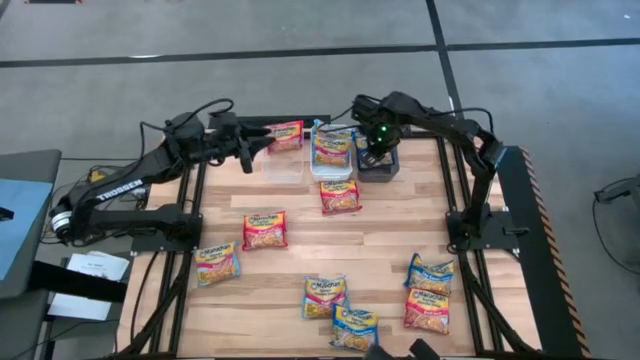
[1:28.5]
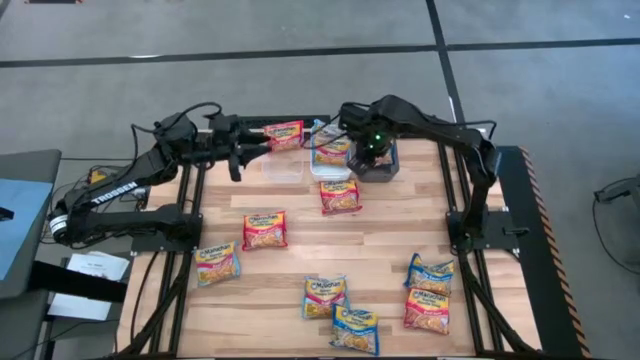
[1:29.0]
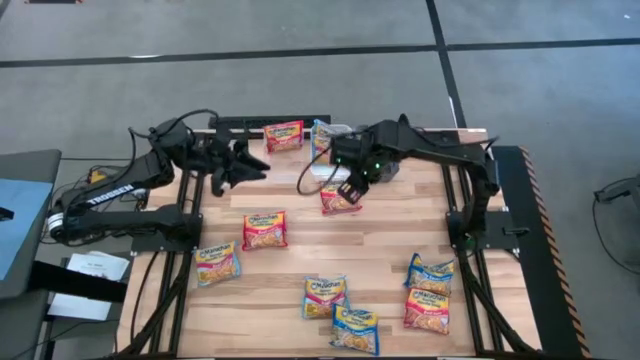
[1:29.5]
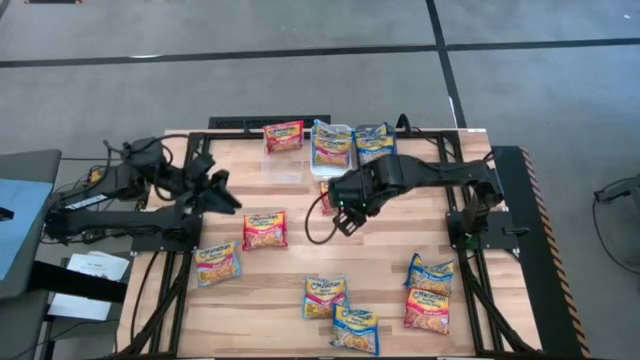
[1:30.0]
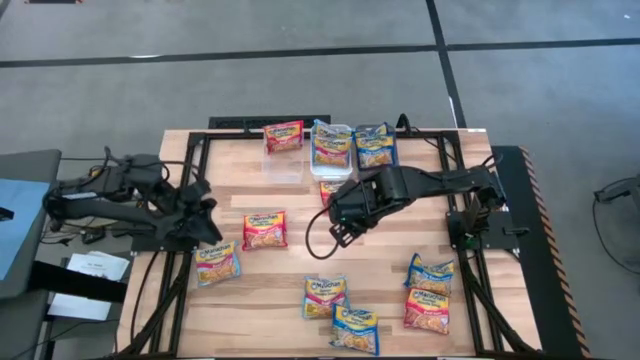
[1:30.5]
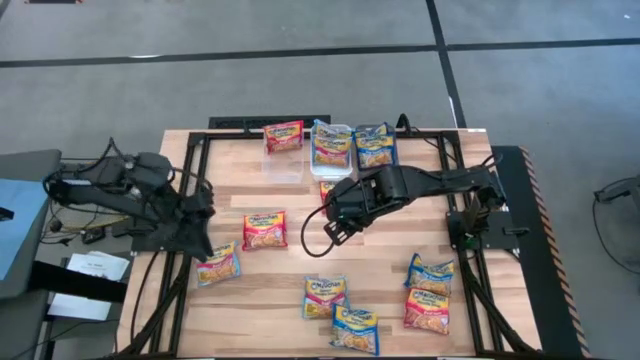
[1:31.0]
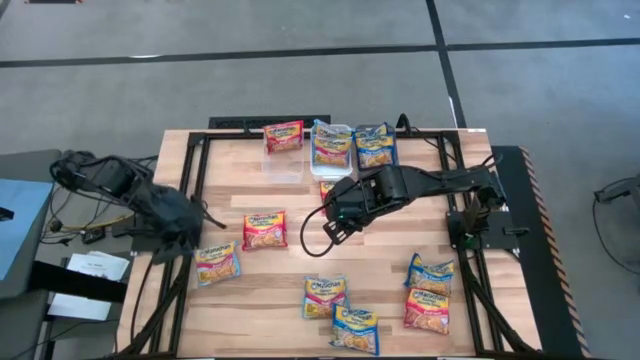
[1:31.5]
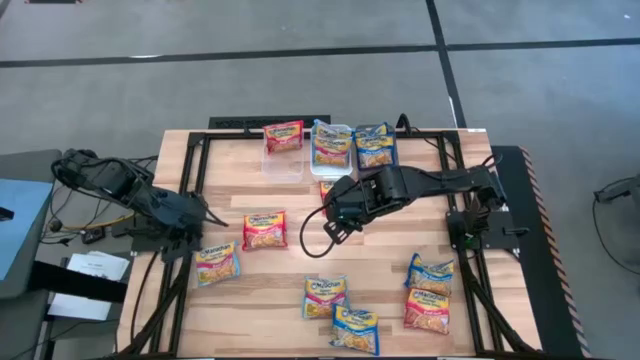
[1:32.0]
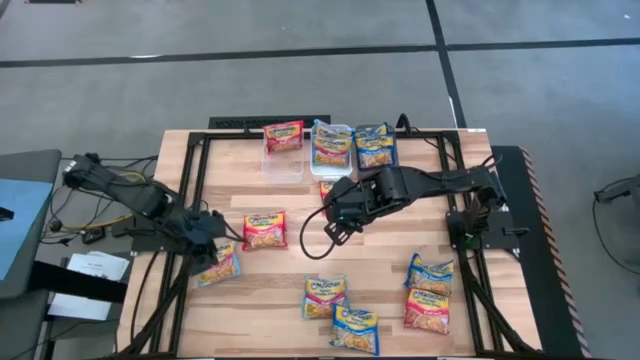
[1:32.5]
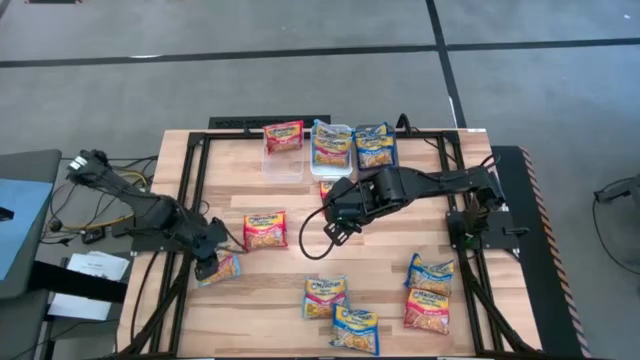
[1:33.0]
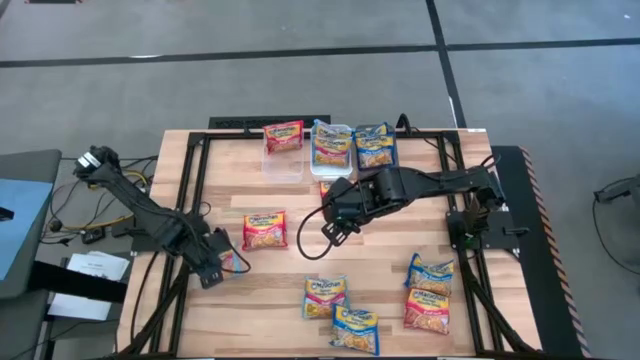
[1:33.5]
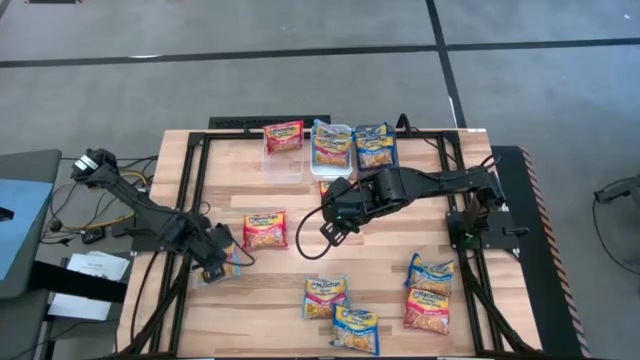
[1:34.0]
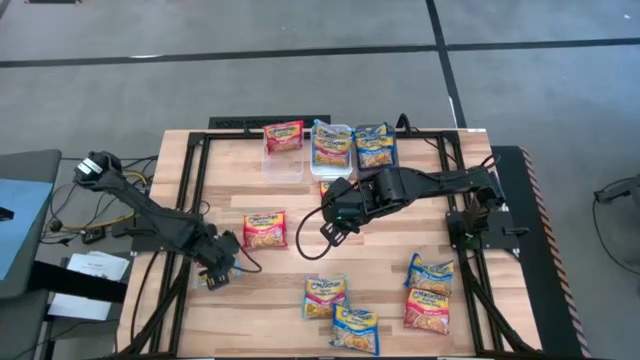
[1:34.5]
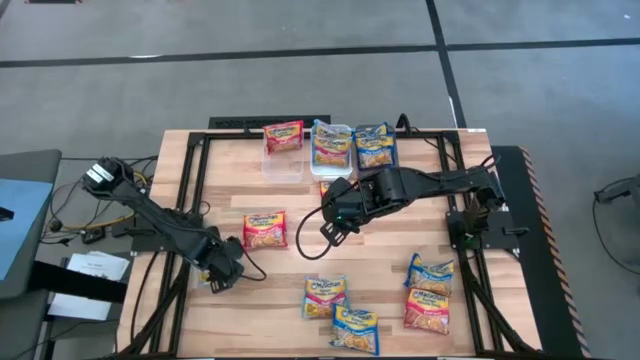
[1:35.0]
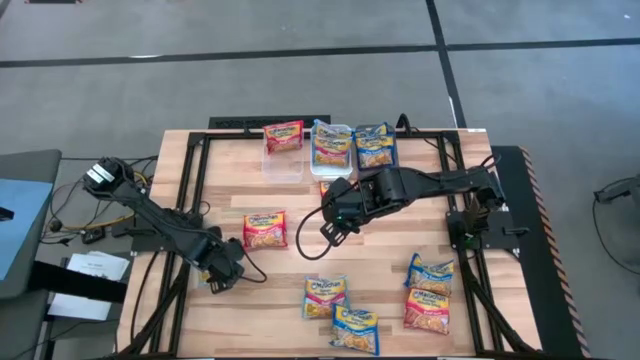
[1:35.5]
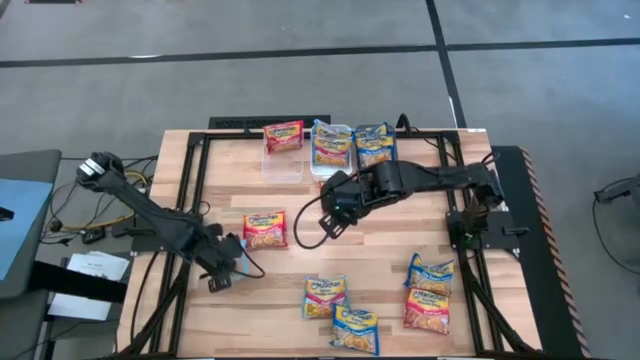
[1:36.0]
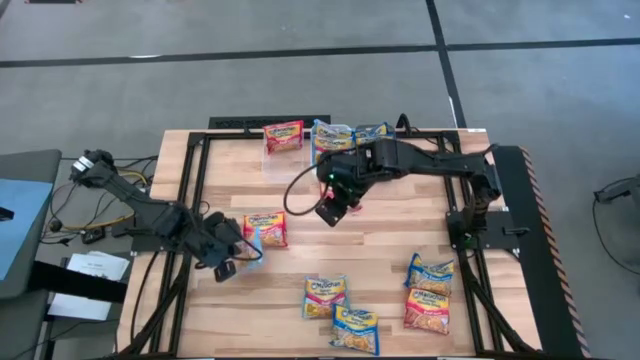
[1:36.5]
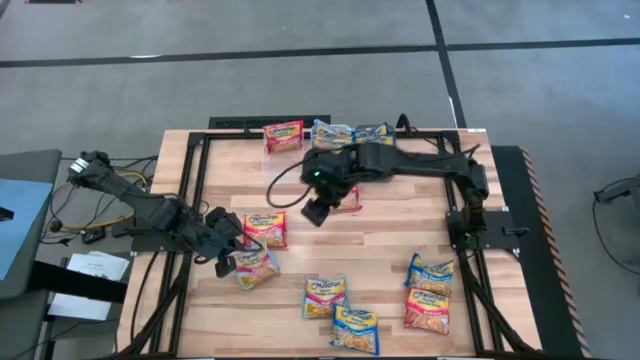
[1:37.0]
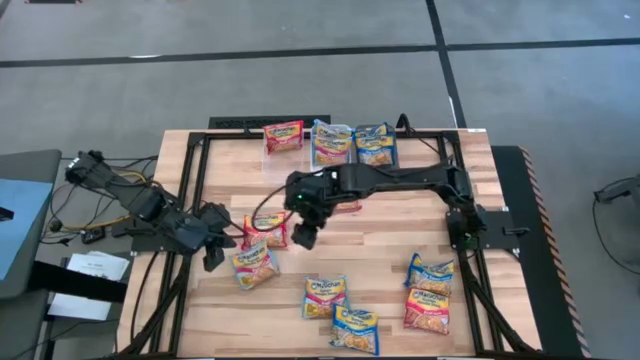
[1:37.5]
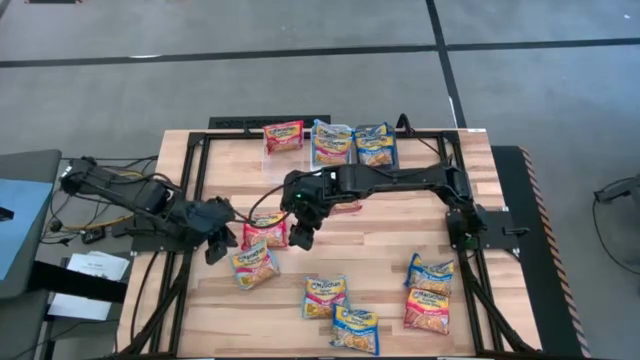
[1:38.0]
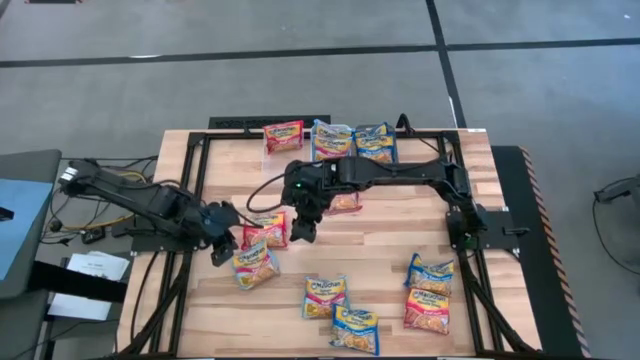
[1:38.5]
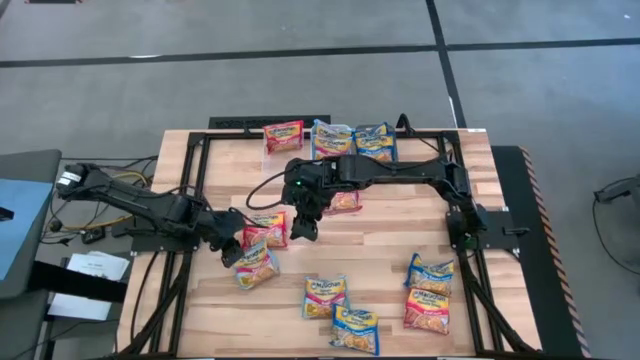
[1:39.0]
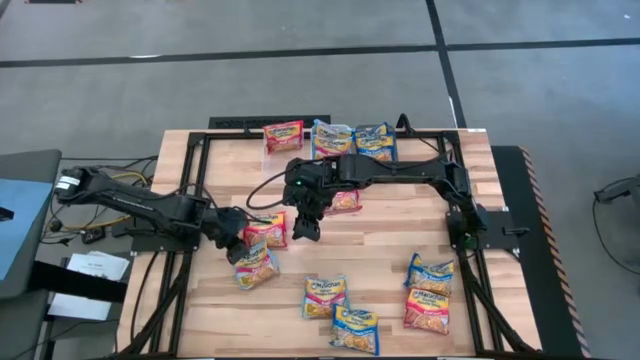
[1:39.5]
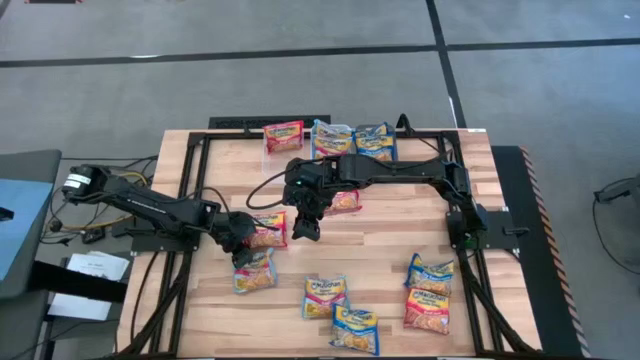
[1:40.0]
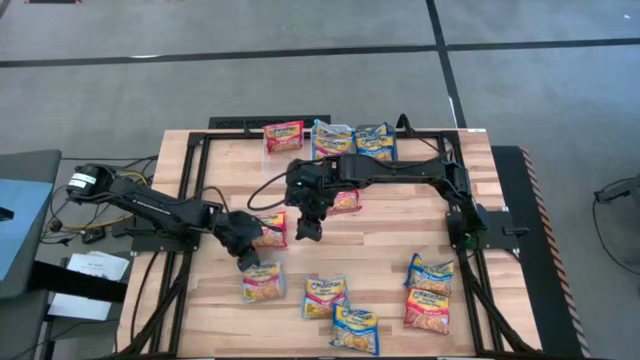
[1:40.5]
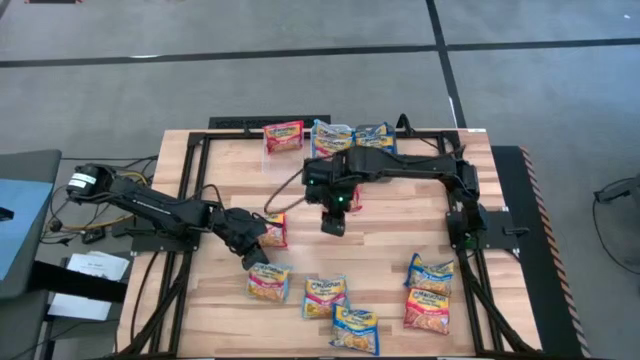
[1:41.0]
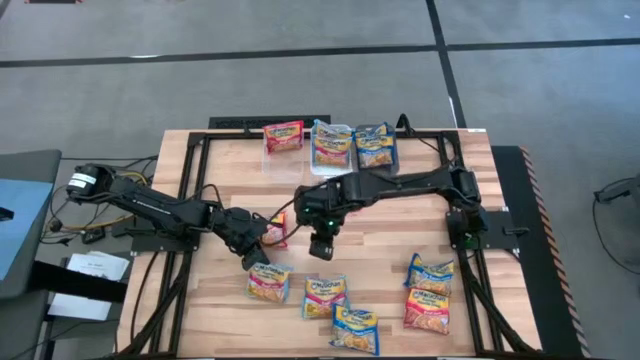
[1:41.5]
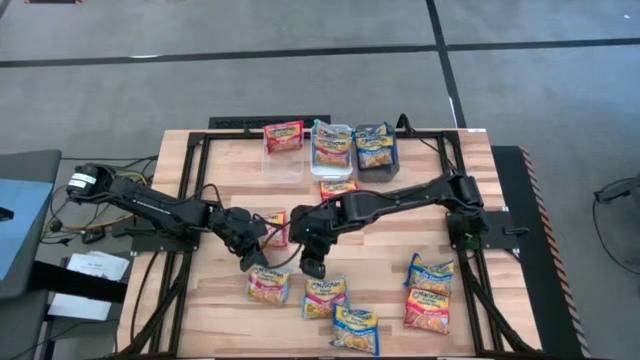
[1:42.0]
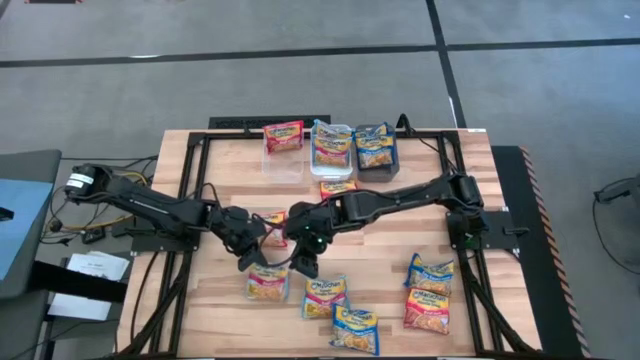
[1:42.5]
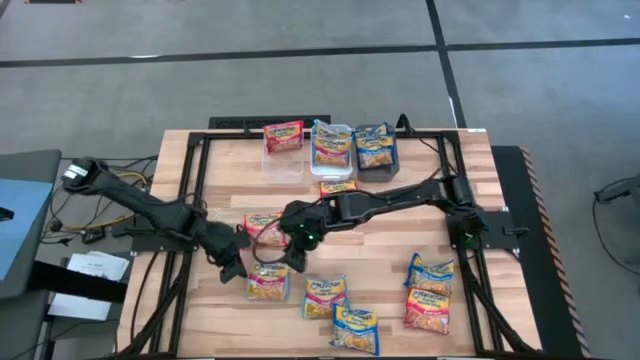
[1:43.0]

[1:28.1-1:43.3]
Task: Sort Maruchan noodles
Put the light blue noodle pack into the white bin

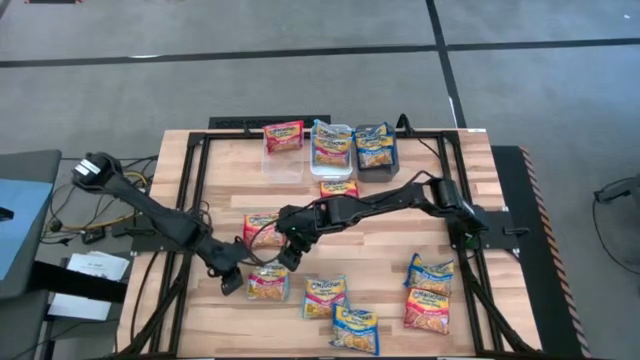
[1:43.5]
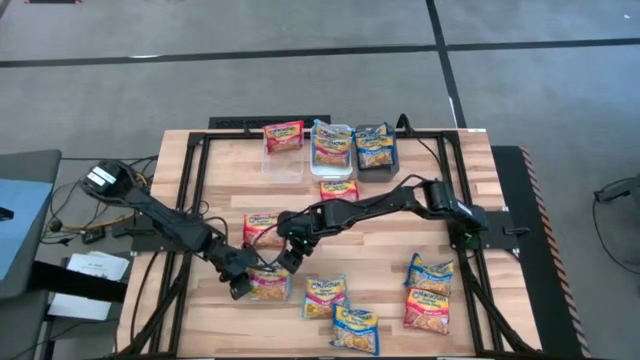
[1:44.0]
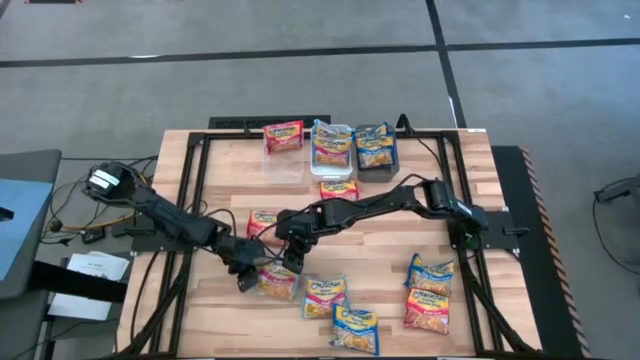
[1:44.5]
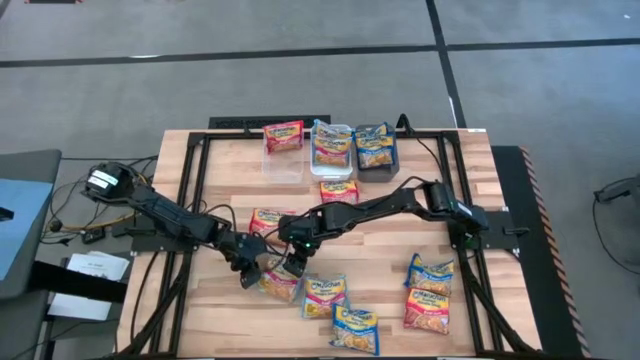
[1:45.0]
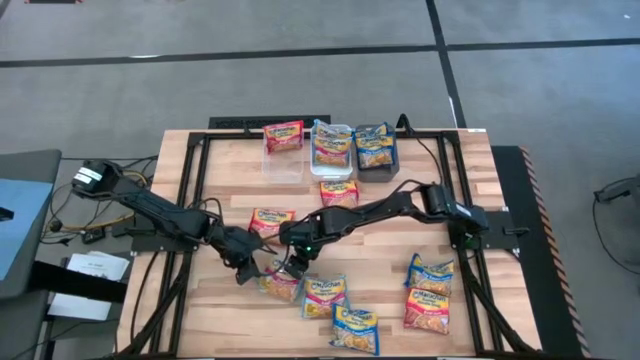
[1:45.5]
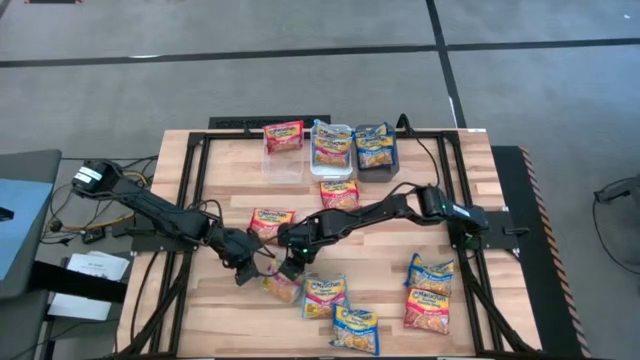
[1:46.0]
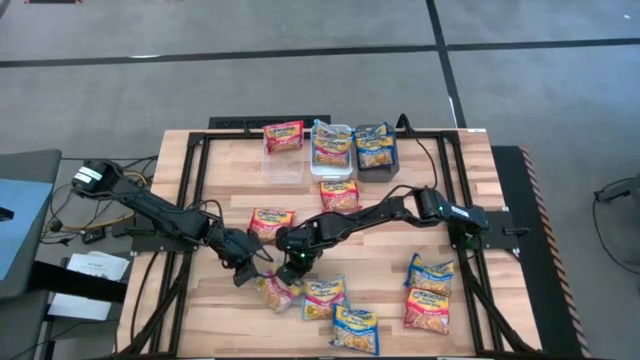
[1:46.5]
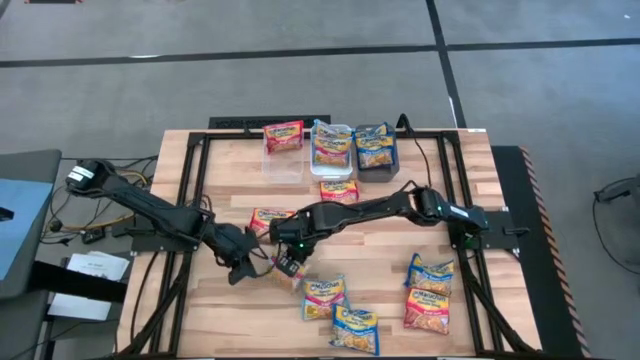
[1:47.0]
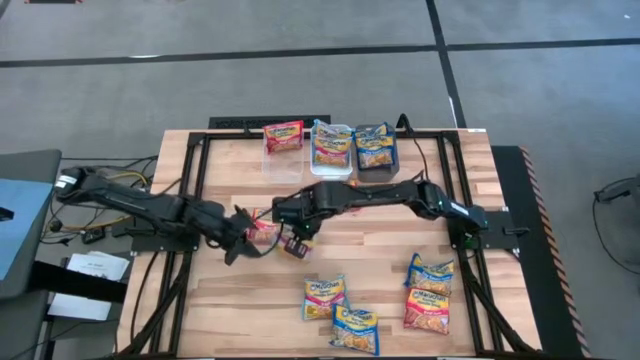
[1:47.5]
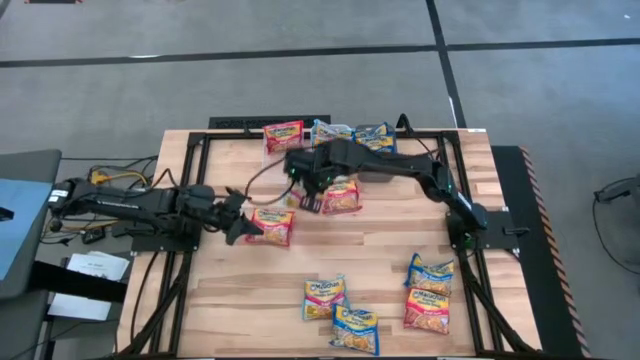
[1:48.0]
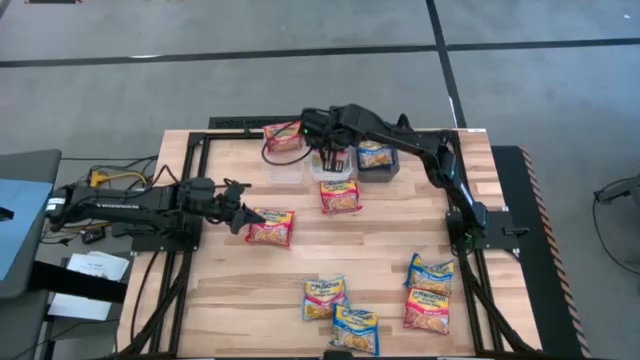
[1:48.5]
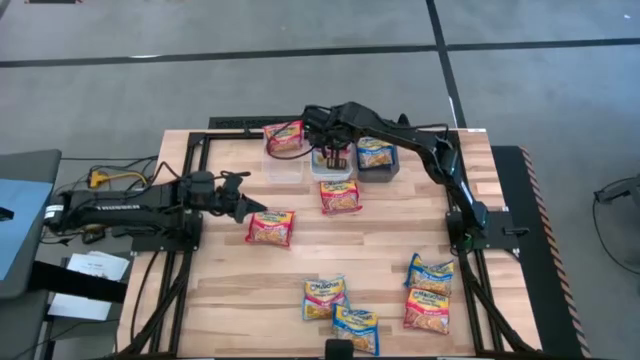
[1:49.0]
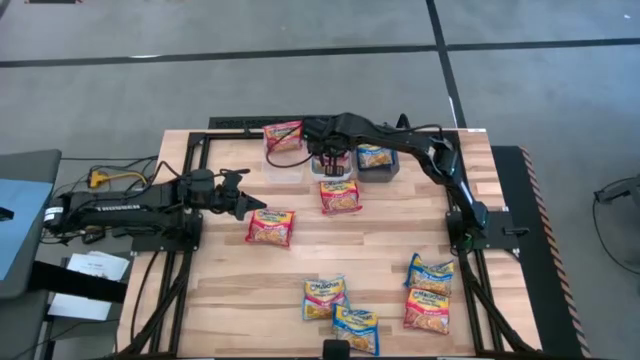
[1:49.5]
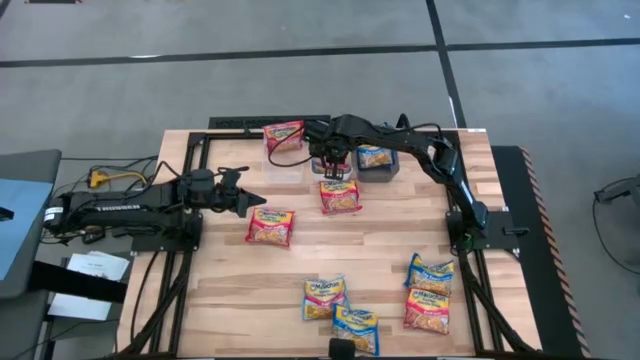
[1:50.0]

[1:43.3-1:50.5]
Put the light blue noodle pack into the white bin
